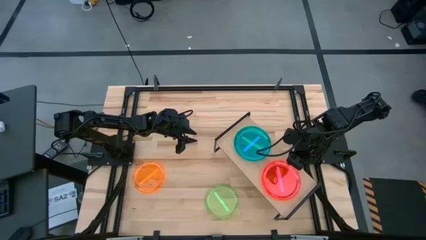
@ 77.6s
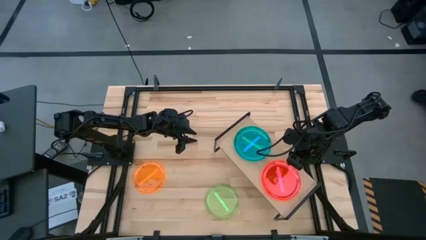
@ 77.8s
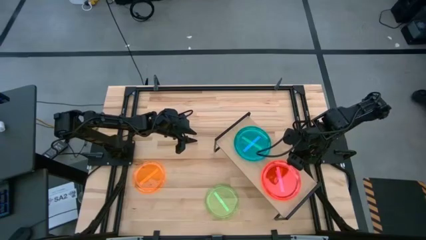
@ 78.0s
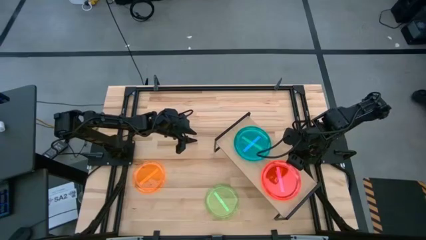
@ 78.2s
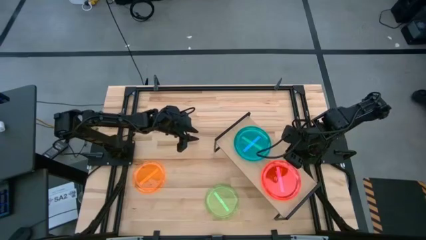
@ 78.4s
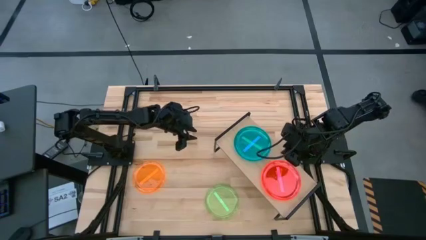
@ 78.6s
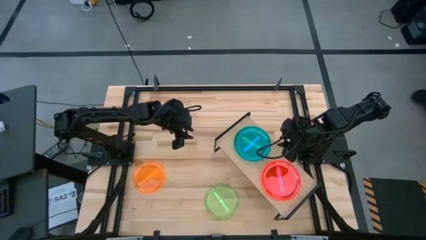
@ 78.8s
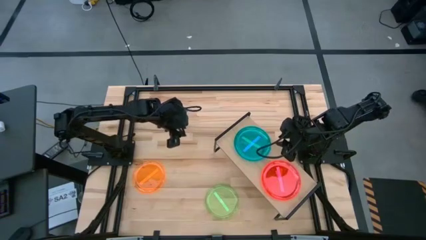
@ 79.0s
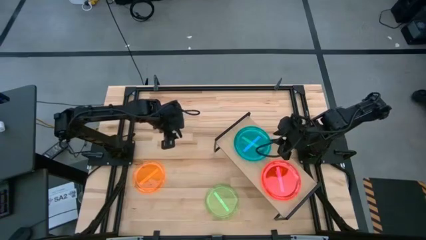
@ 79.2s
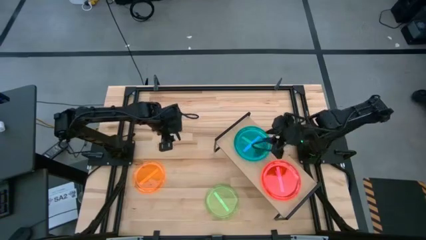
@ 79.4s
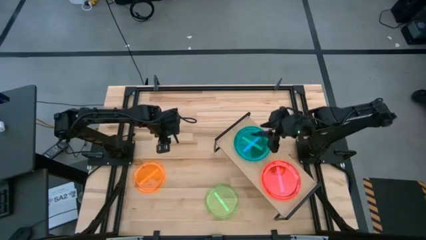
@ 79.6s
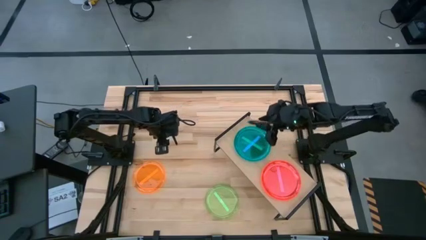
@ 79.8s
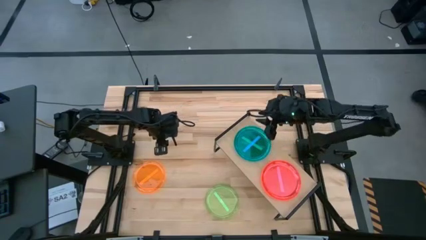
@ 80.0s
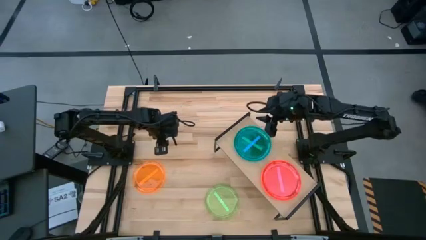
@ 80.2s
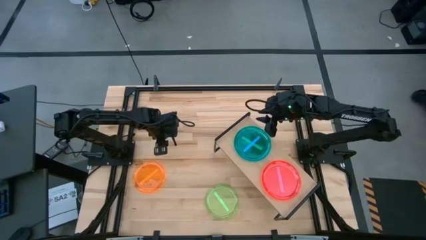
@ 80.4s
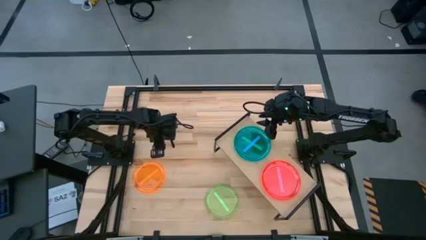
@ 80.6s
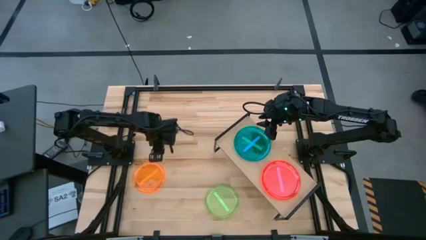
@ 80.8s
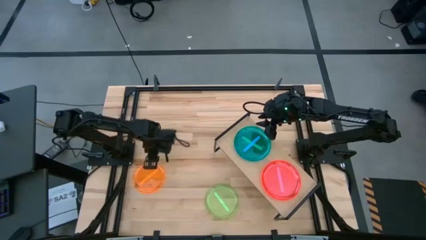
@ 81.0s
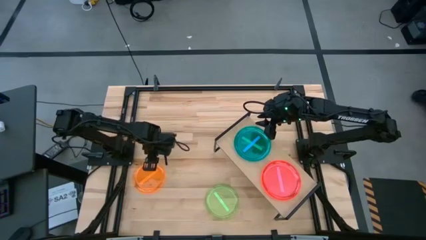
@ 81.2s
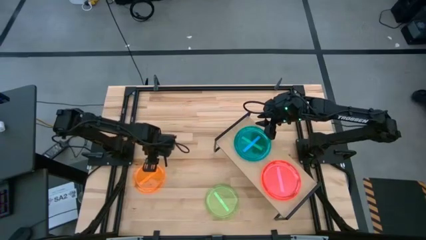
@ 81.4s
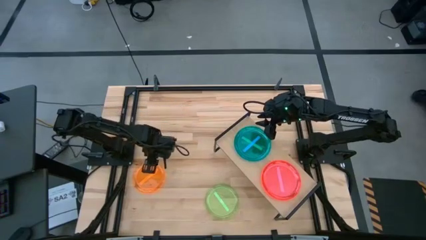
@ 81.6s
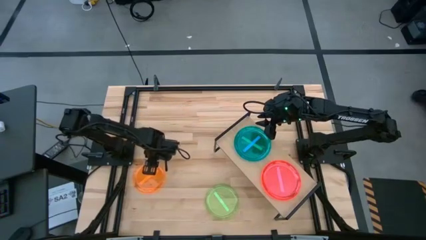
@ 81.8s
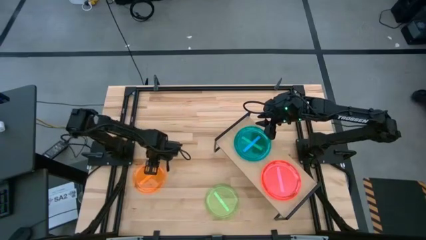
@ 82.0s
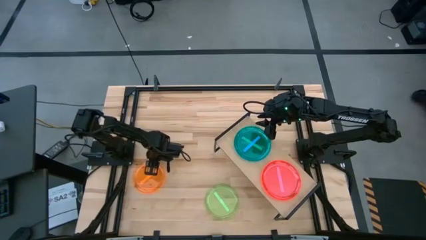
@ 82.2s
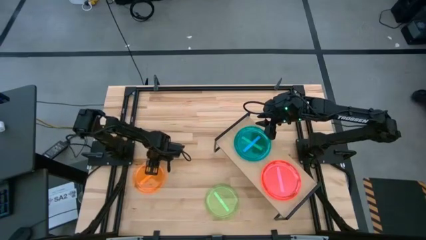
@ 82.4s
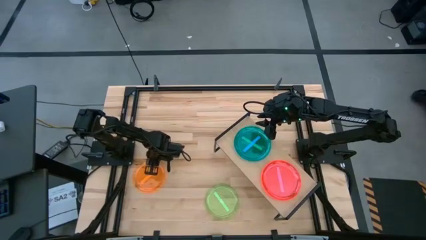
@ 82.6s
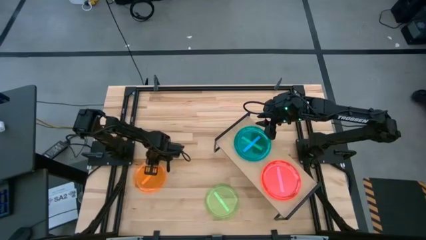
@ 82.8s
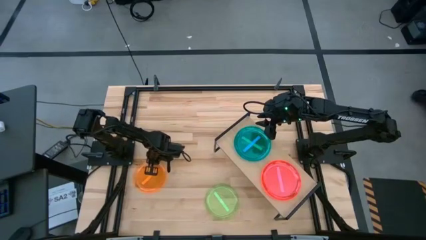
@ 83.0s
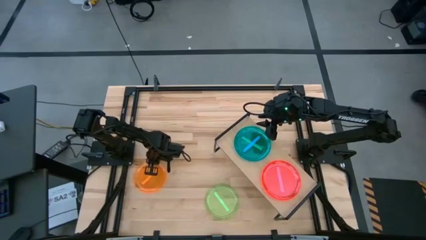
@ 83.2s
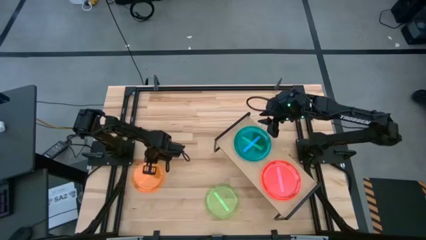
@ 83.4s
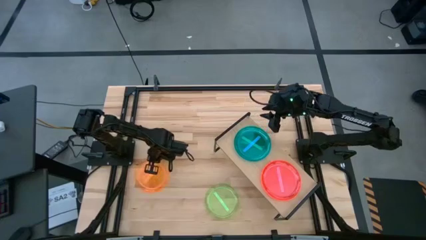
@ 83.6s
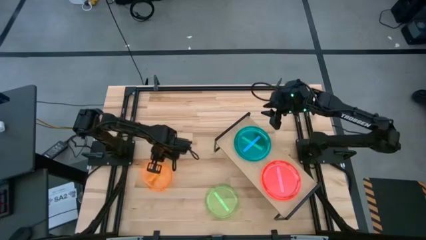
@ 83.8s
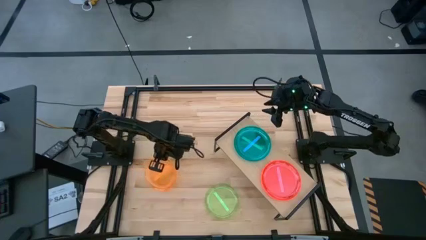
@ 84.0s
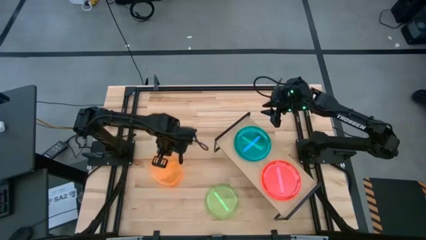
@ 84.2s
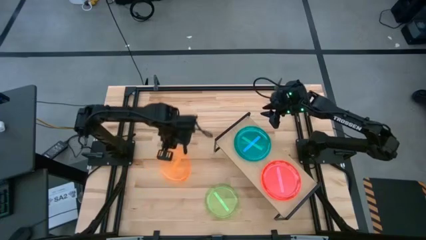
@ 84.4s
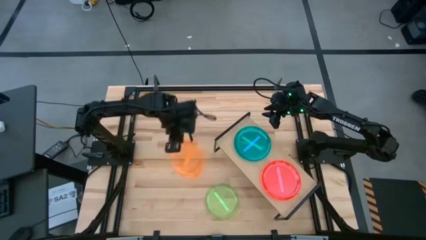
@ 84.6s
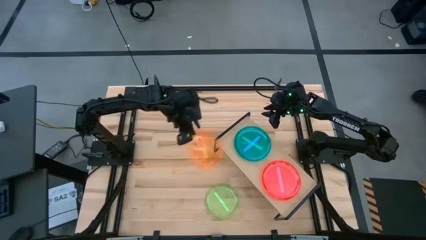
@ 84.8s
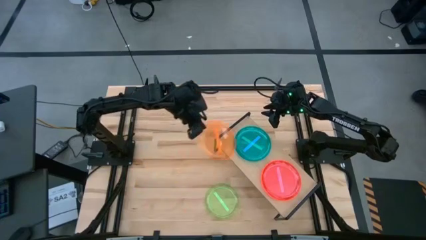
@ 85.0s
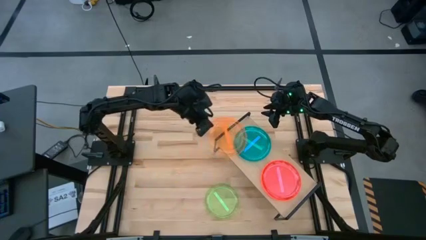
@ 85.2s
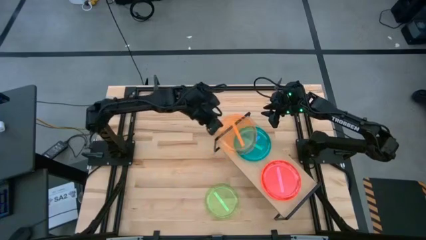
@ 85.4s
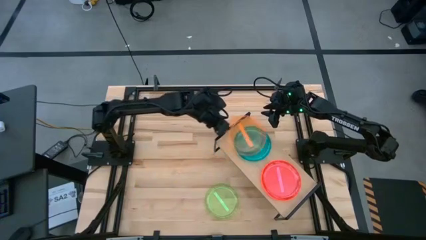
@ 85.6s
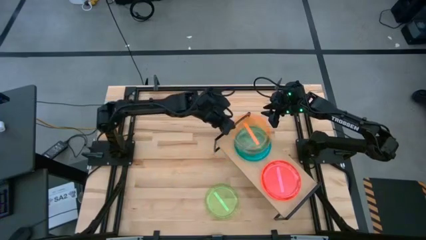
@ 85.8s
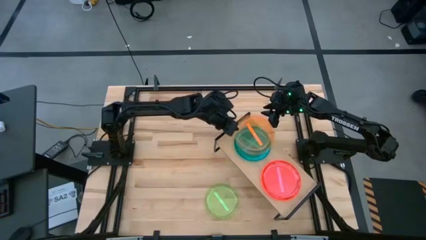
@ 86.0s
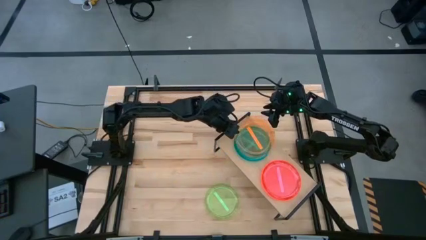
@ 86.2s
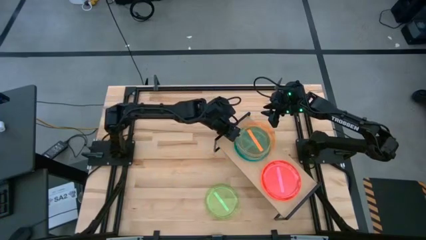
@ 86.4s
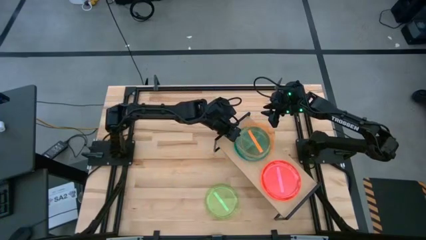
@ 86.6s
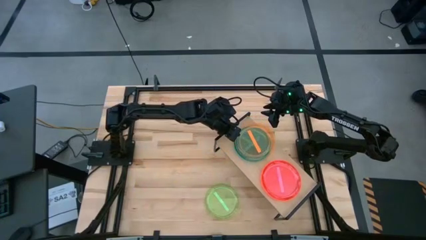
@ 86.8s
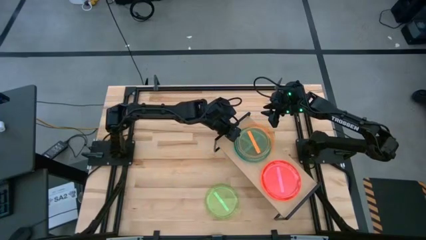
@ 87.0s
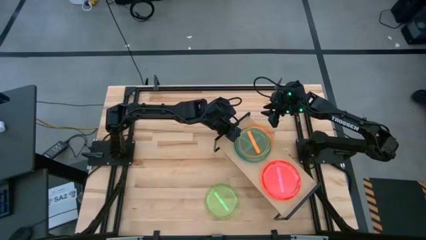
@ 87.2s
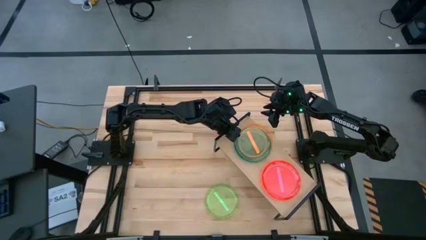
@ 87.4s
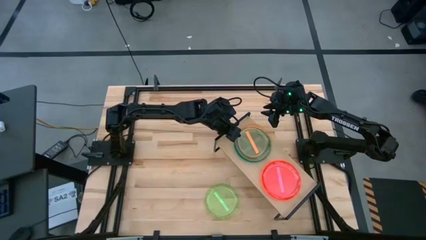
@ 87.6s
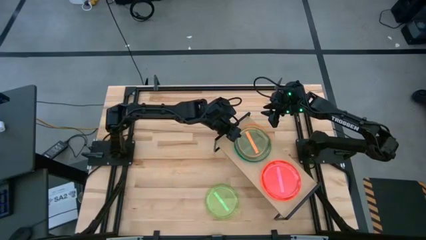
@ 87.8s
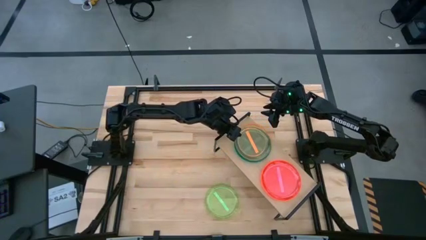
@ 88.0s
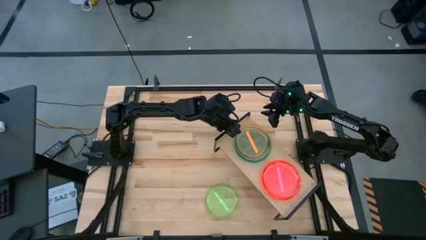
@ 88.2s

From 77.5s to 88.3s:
Task: Place and stack plates onto a shelf
Stack the orange plate on top of the blue plate on the shelf

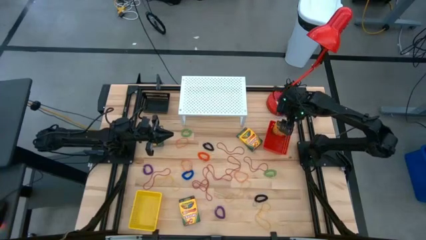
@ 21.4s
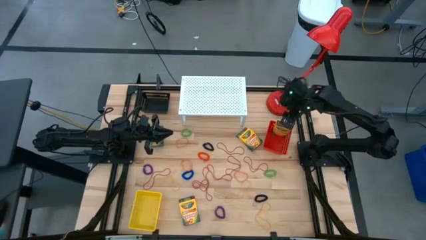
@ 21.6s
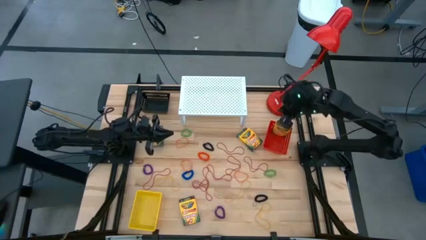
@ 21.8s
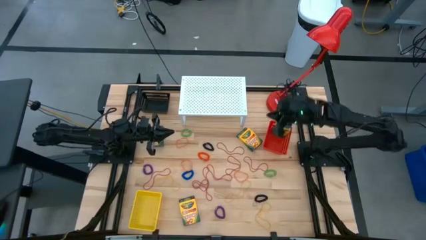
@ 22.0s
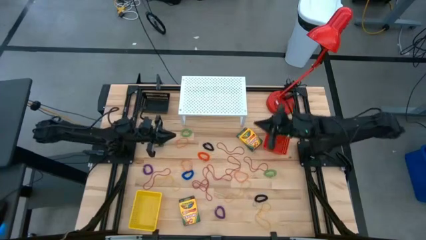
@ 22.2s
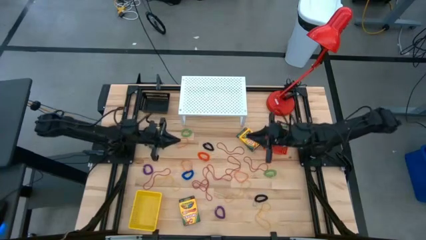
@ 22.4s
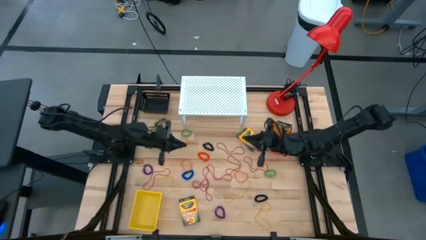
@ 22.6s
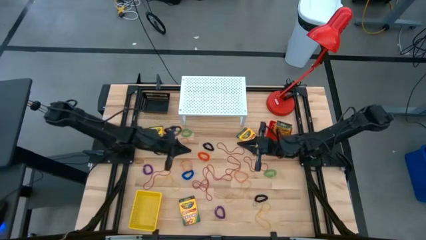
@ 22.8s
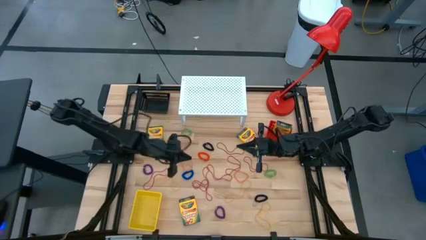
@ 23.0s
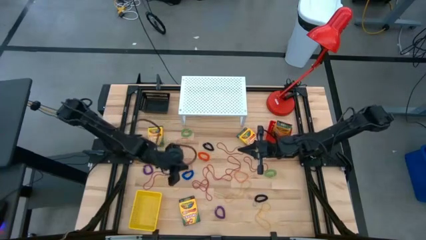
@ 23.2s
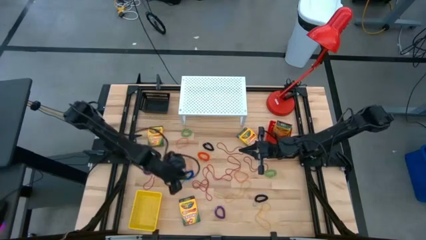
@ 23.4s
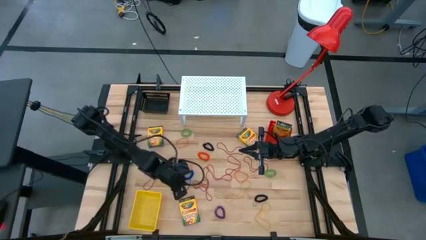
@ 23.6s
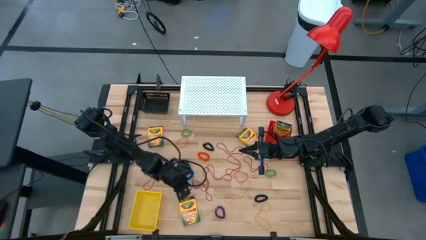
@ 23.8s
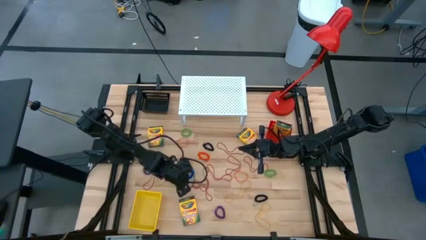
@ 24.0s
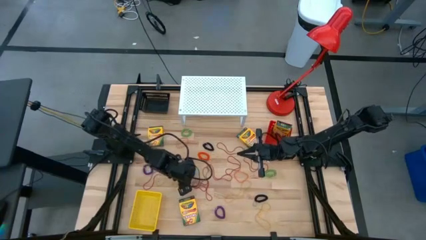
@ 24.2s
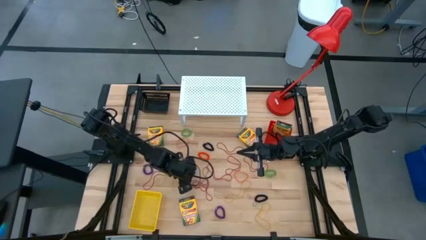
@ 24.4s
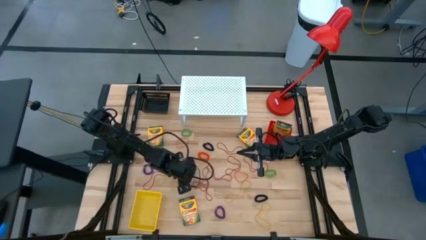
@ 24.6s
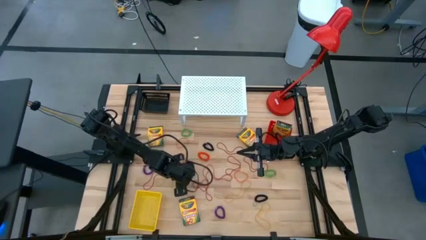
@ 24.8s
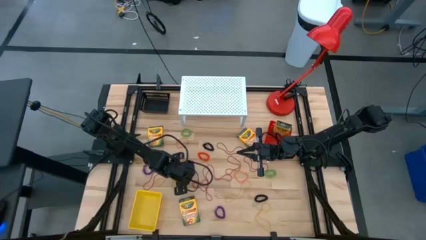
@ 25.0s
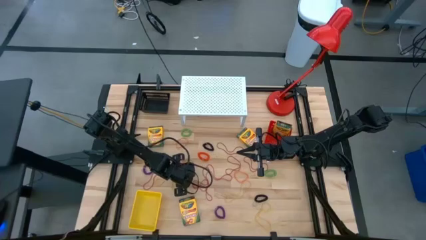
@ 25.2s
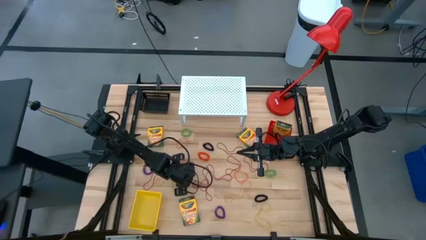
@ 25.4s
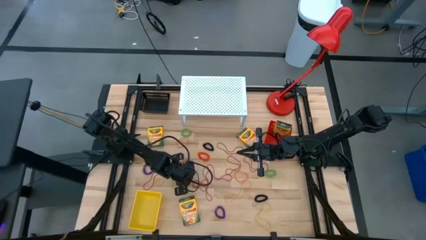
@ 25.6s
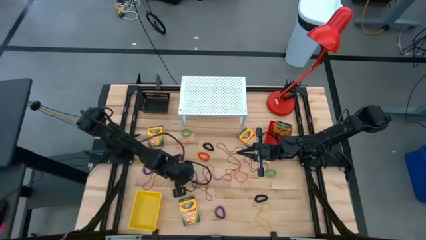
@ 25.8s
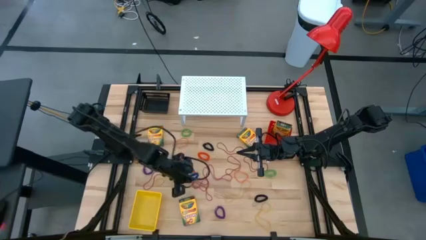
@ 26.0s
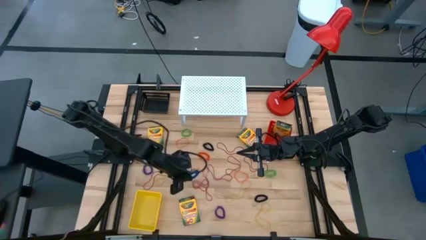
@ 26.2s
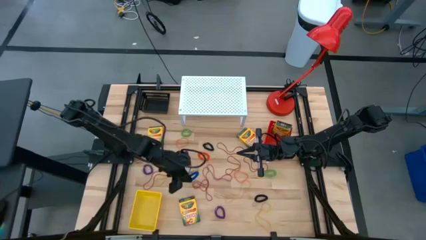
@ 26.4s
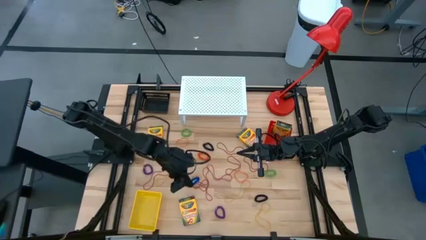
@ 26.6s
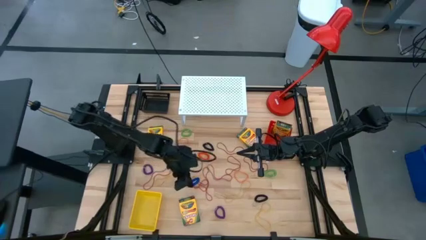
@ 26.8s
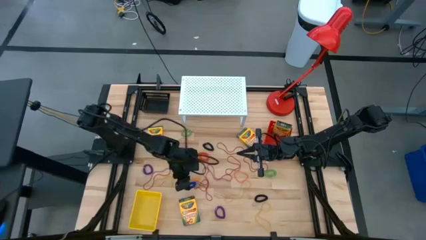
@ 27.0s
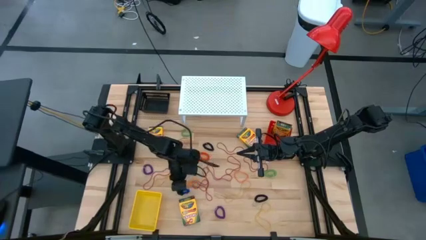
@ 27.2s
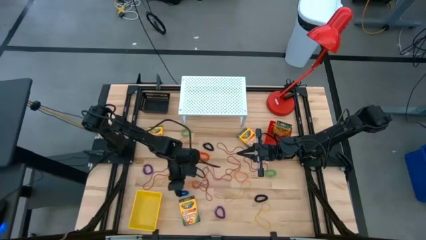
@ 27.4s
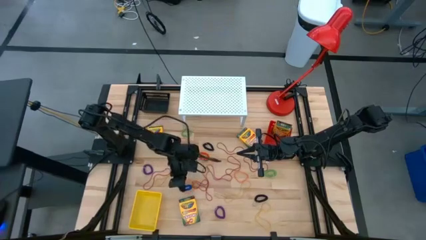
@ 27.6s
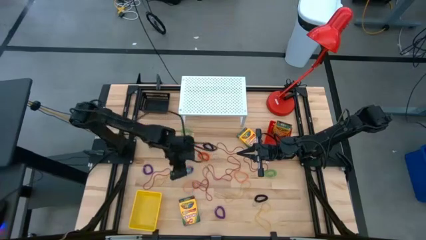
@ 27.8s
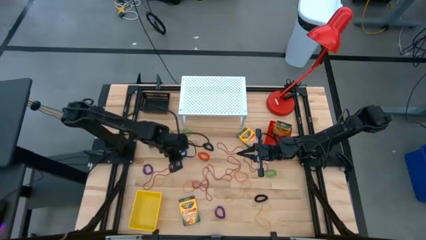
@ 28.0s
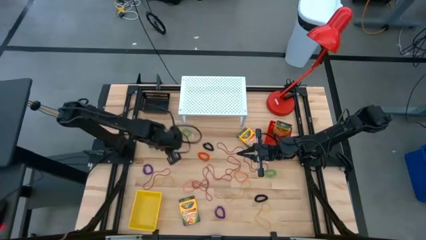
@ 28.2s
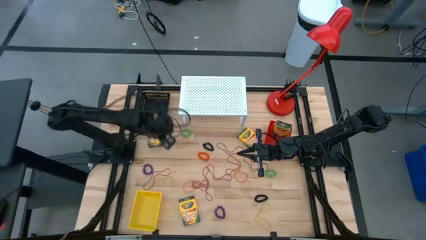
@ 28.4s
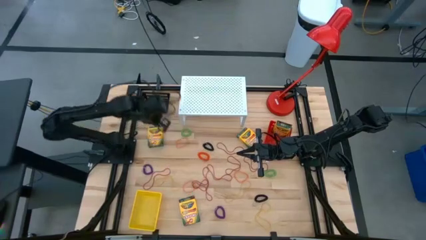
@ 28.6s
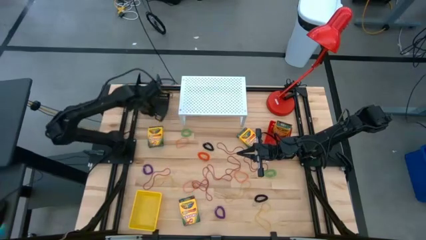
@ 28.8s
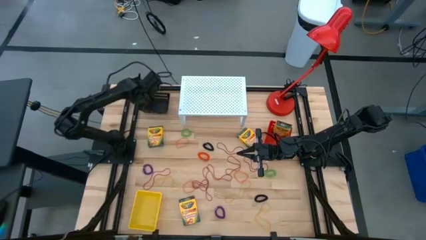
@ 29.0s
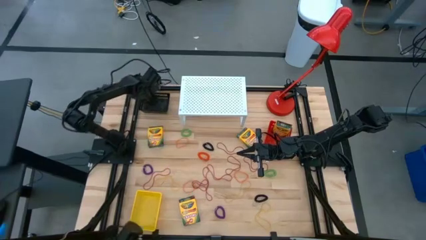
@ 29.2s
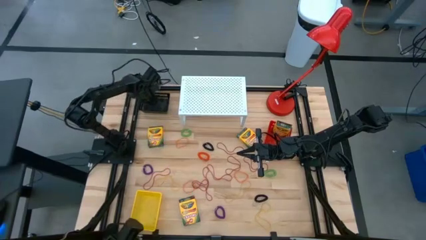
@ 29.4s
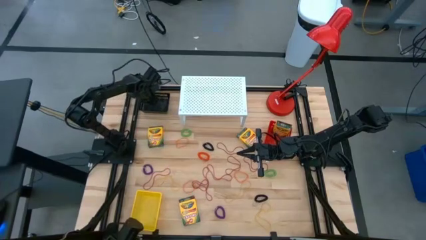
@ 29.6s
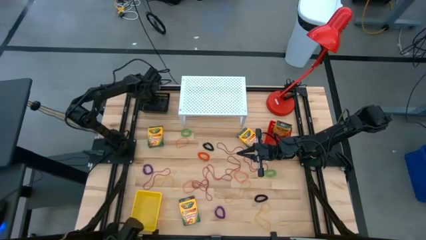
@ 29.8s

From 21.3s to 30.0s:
Task: Pick & Place Office Desk Supplies
Put the blue spring rubber band into the black bin
